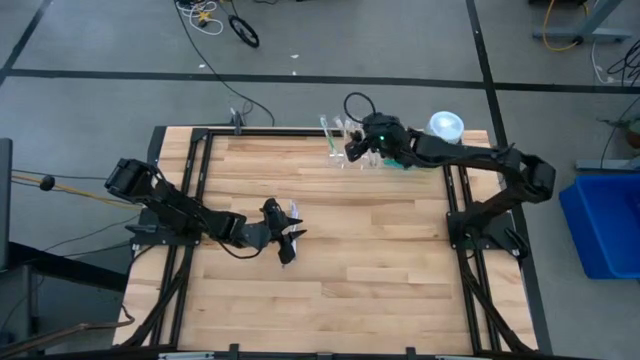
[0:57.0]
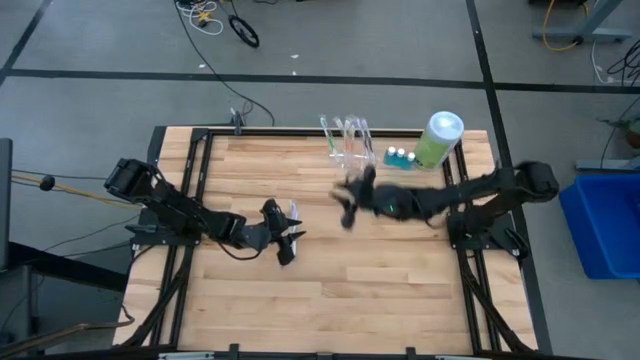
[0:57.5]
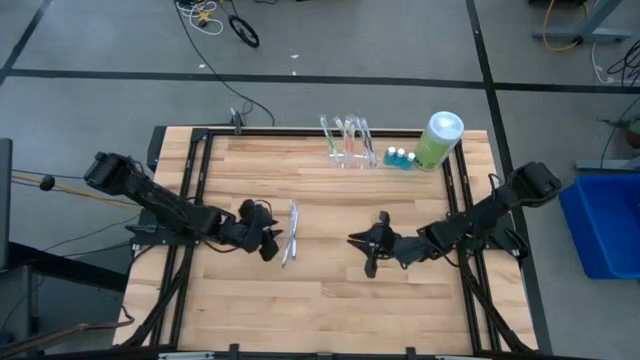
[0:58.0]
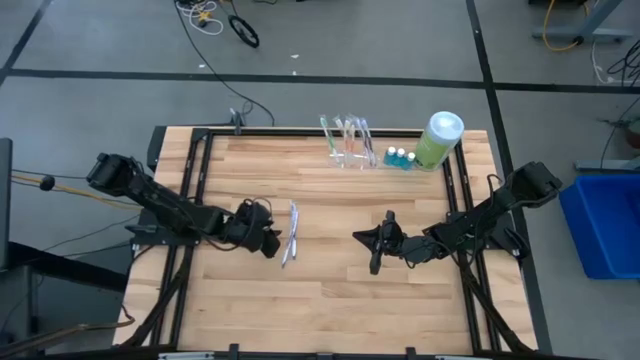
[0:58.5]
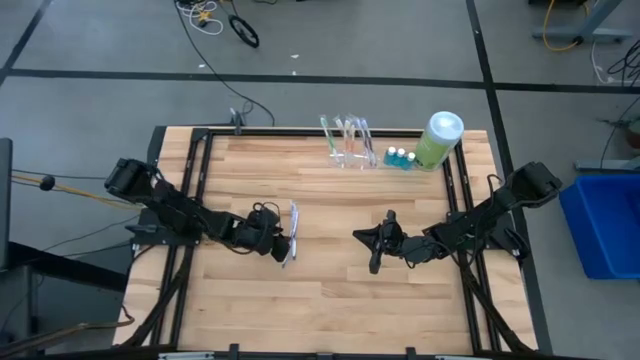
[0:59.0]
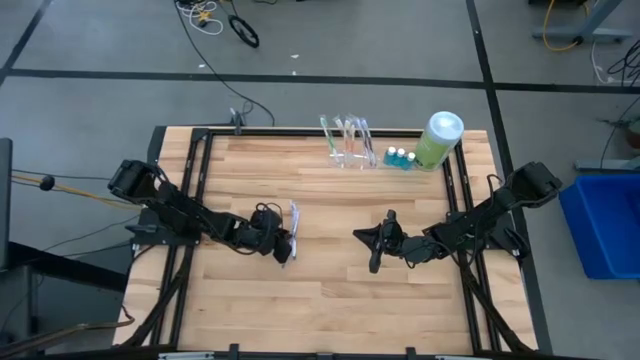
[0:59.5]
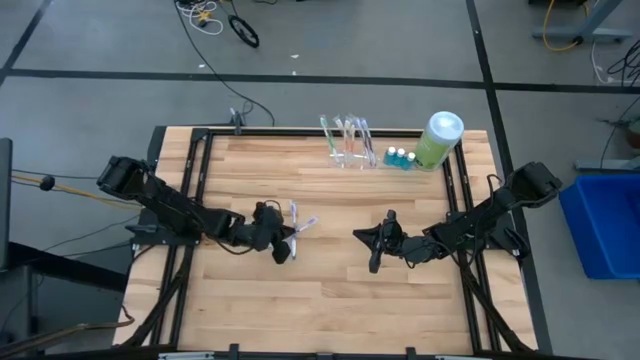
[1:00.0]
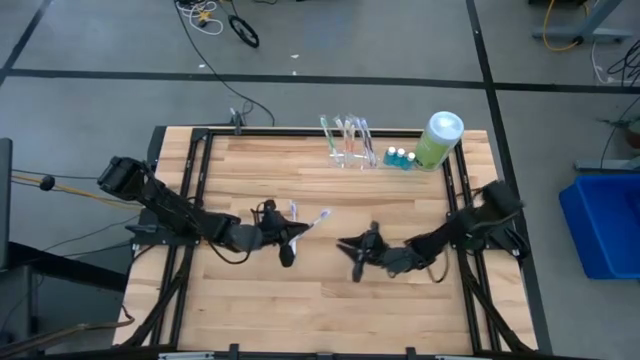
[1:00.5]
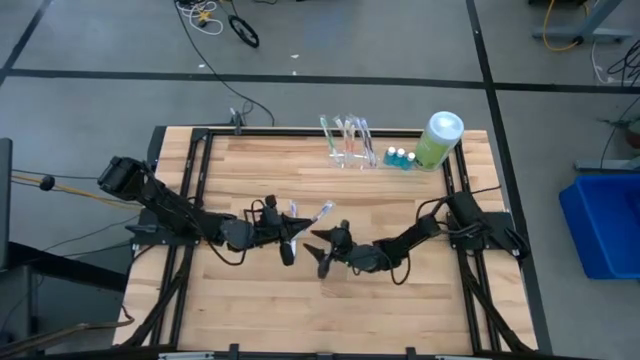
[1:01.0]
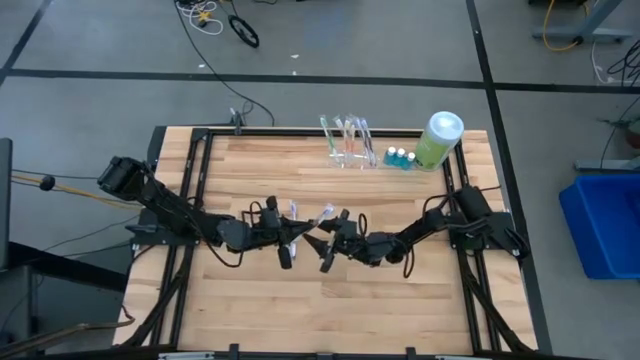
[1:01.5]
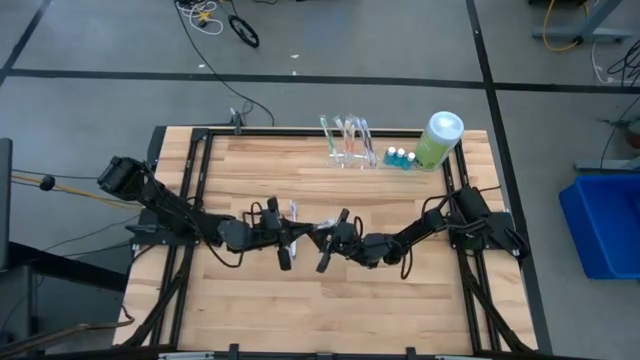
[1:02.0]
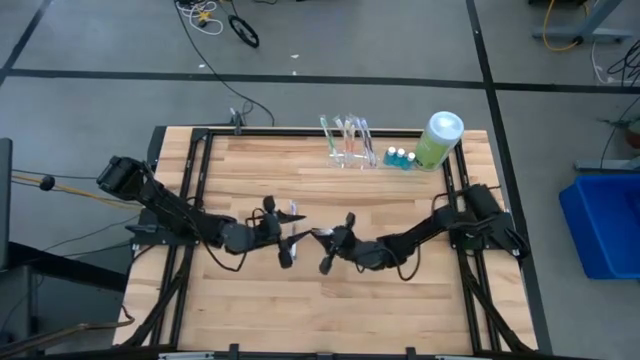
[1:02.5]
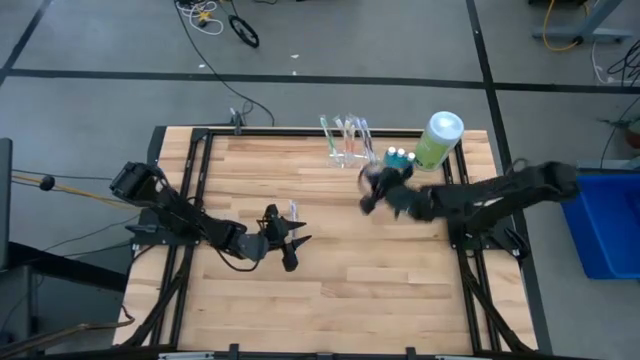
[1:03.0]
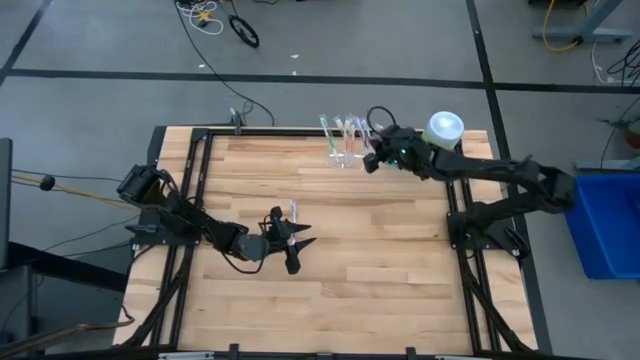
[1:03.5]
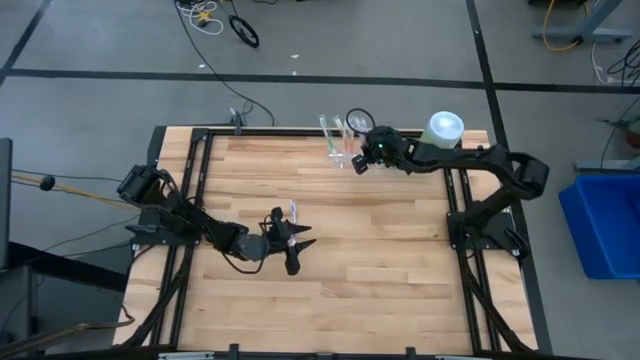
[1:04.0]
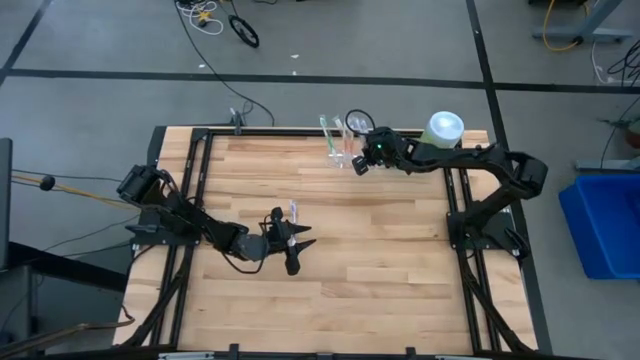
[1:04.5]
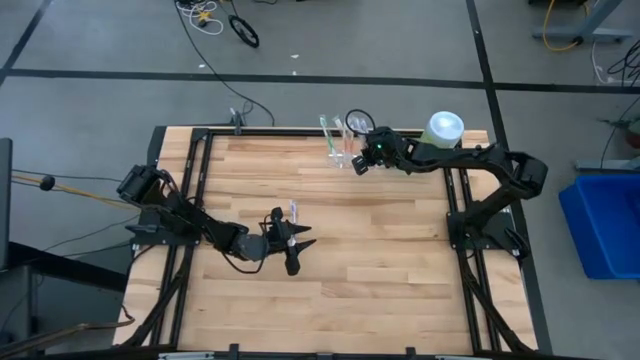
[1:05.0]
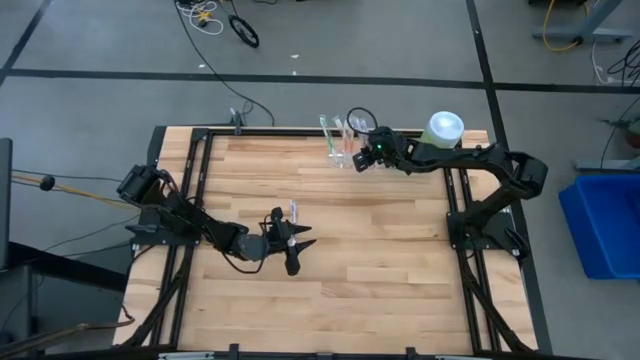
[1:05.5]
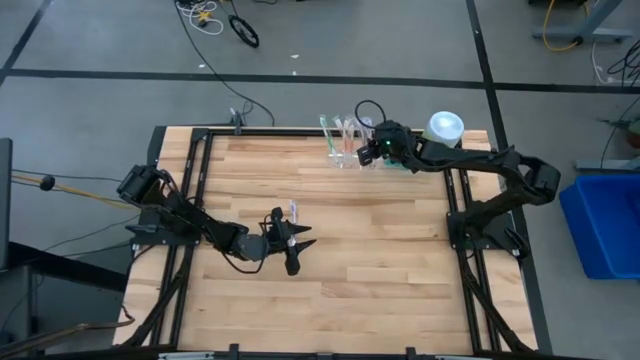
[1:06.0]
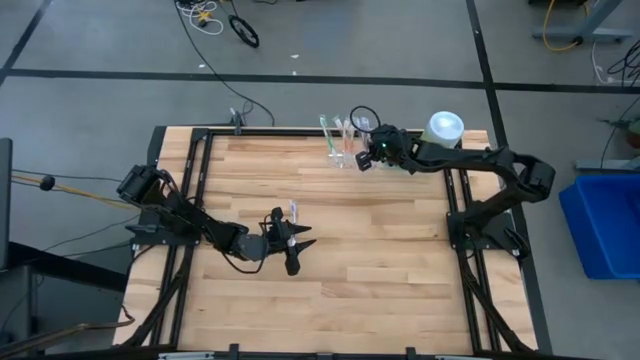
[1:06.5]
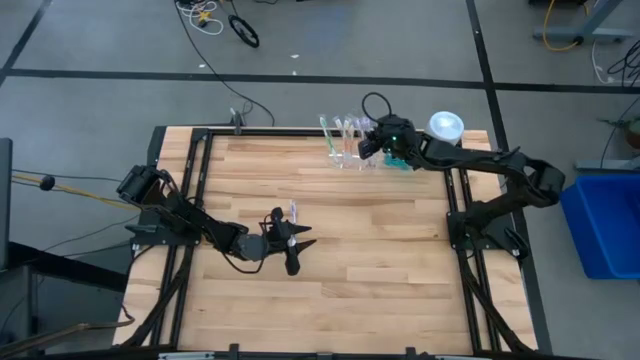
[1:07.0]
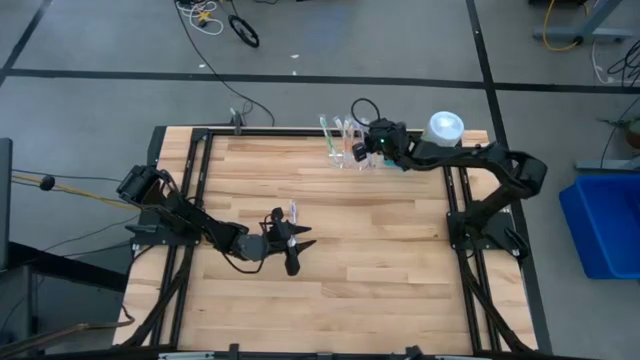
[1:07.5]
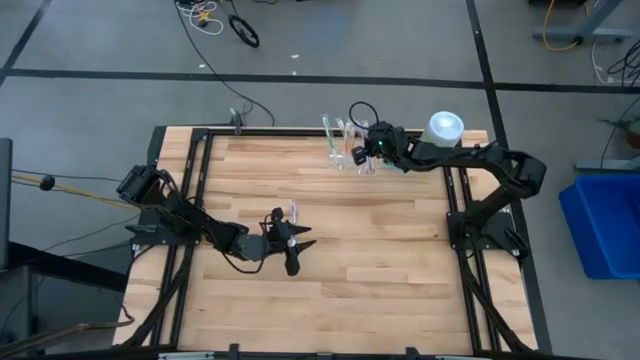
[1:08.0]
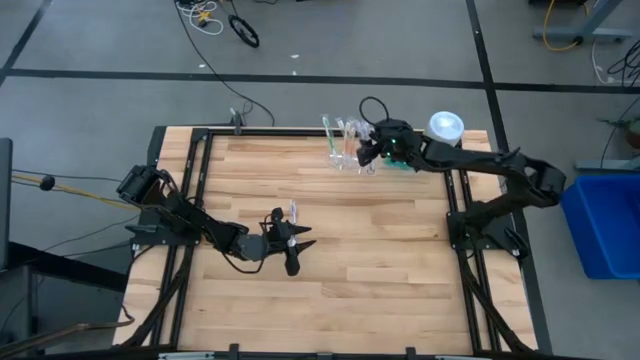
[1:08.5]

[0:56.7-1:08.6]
Task: Pick & Place toothbrushing station
Put the purple toothbrush into the right section of the transparent organizer

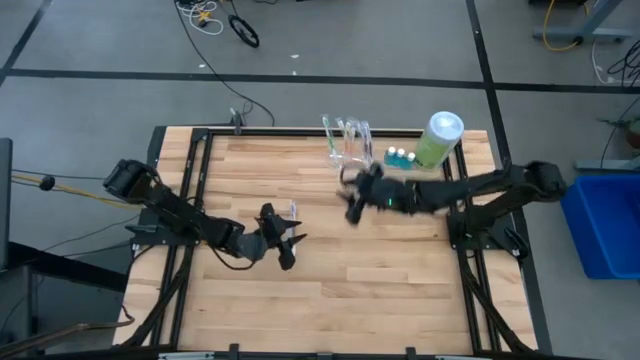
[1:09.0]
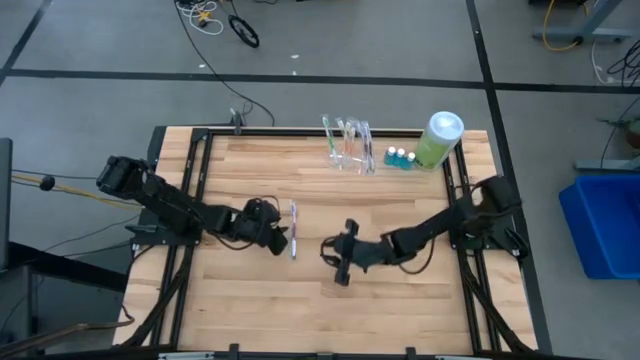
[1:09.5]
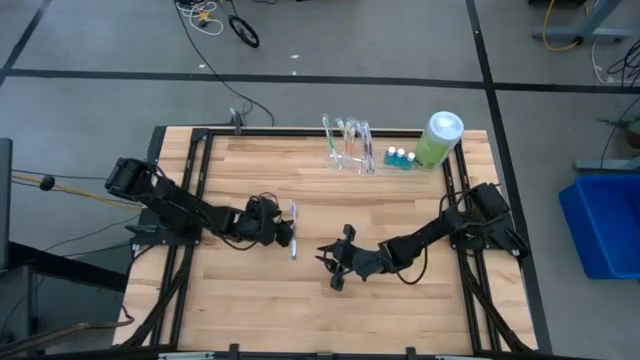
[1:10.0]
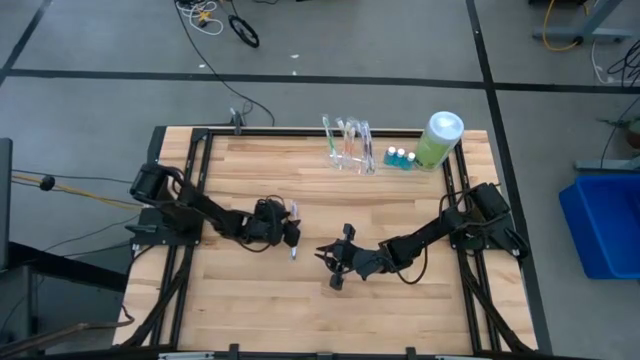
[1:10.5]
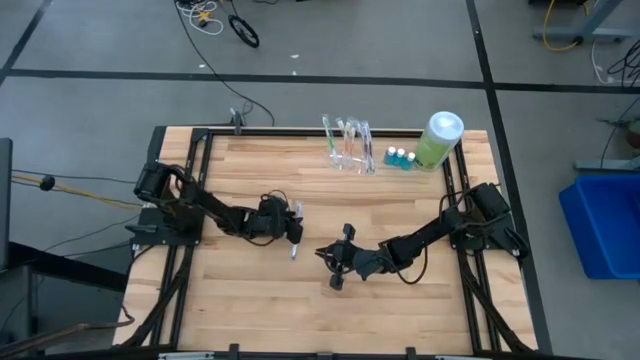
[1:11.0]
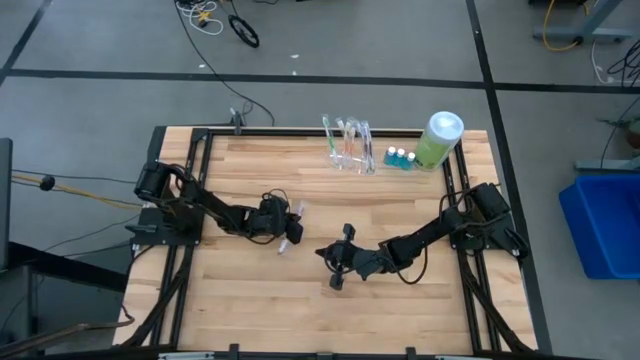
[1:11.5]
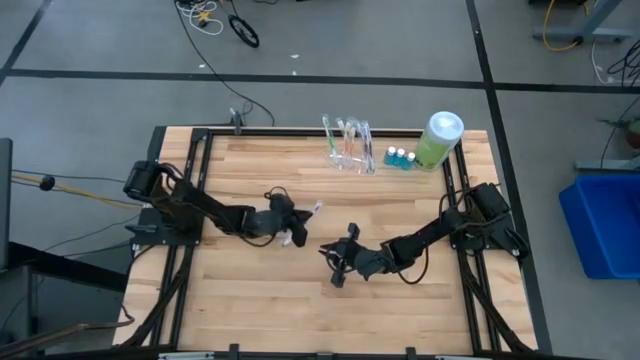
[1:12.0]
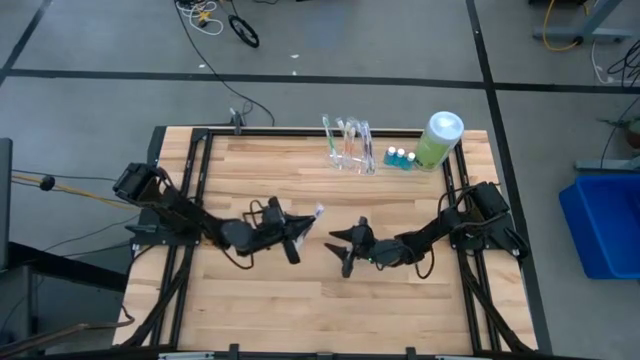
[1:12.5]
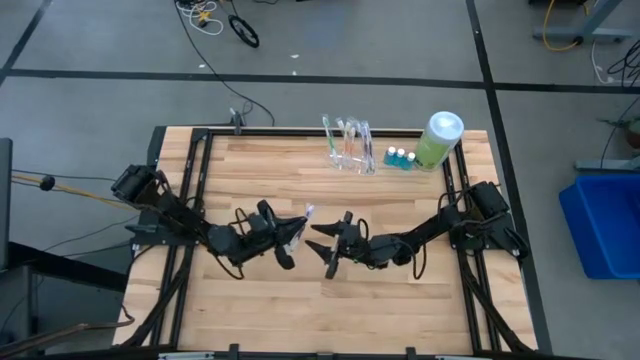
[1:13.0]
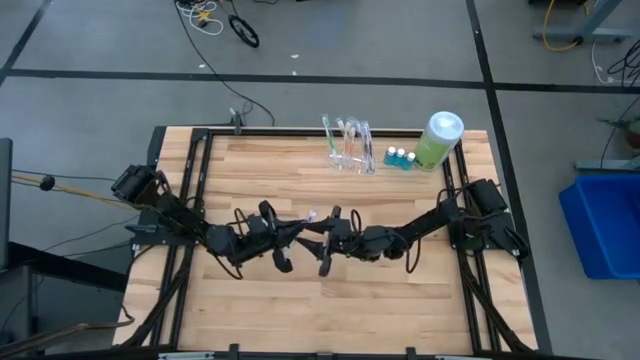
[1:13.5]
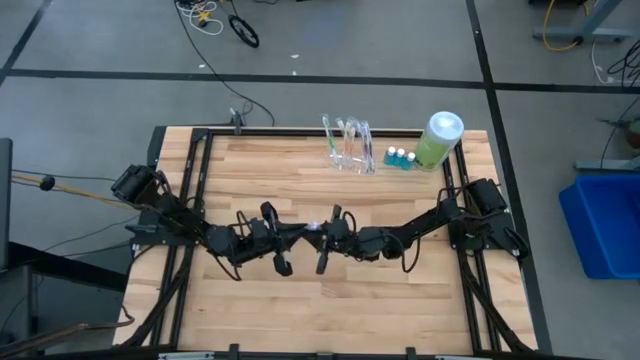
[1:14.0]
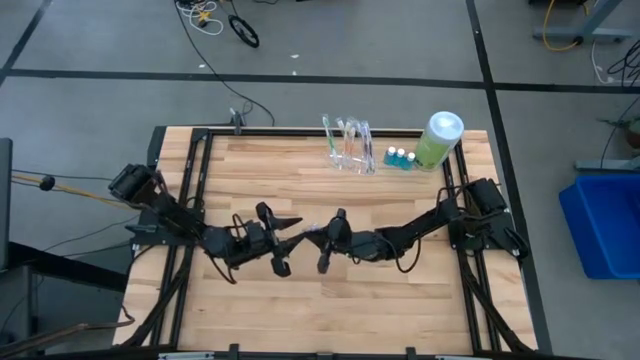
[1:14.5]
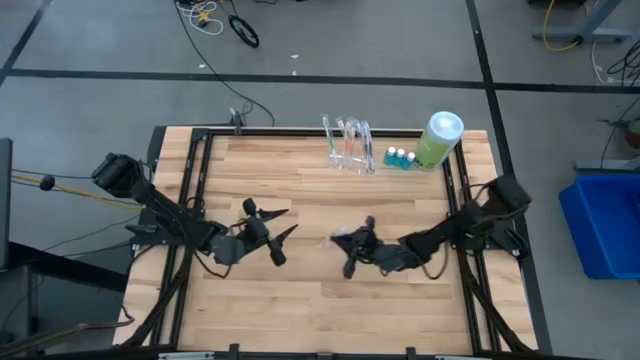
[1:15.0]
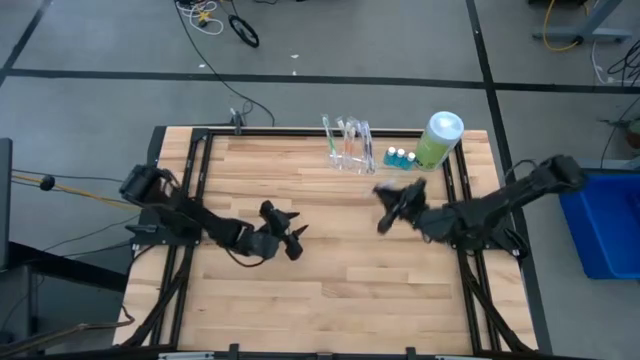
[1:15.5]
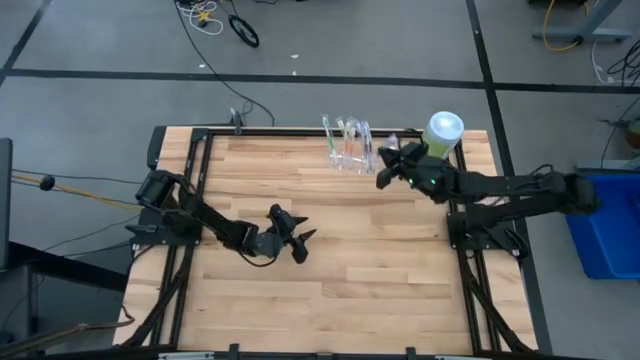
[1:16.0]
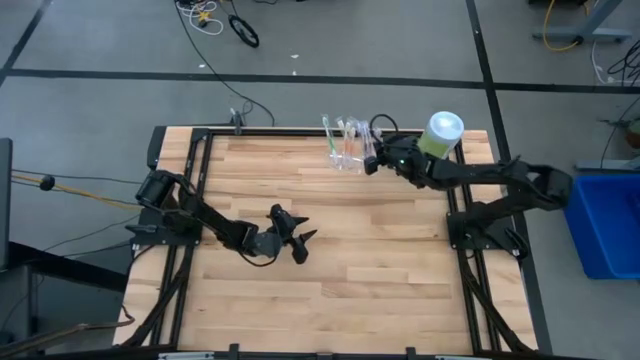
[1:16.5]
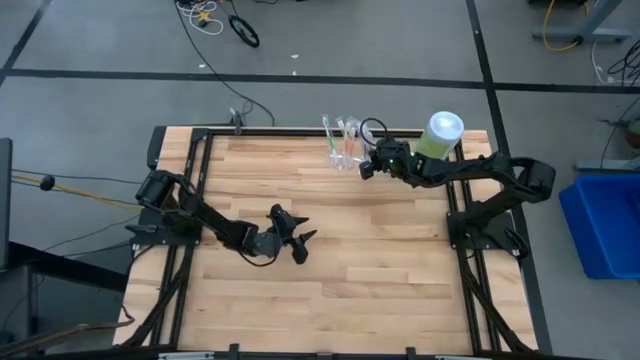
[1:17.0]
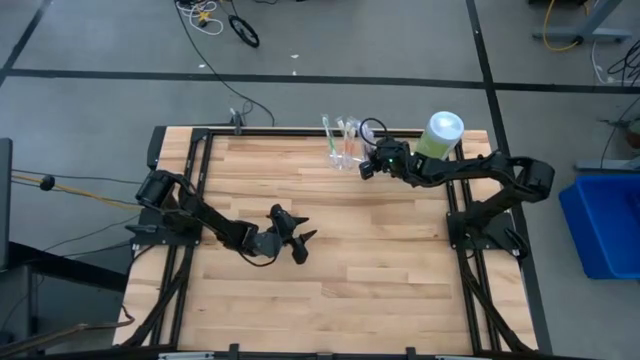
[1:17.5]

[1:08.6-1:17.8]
Put the purple toothbrush into the right section of the transparent organizer

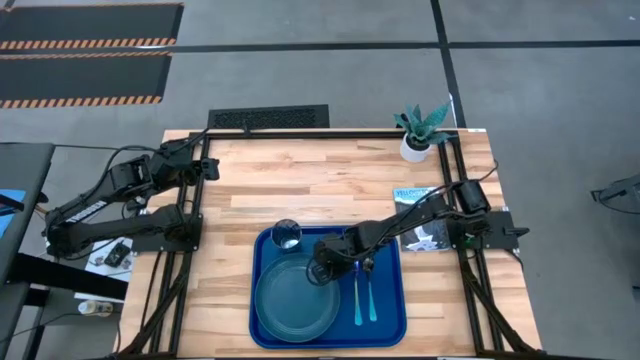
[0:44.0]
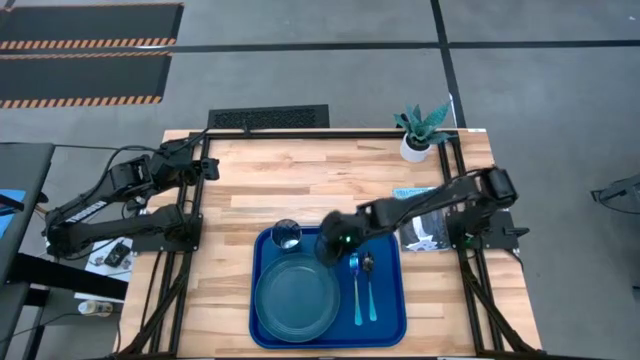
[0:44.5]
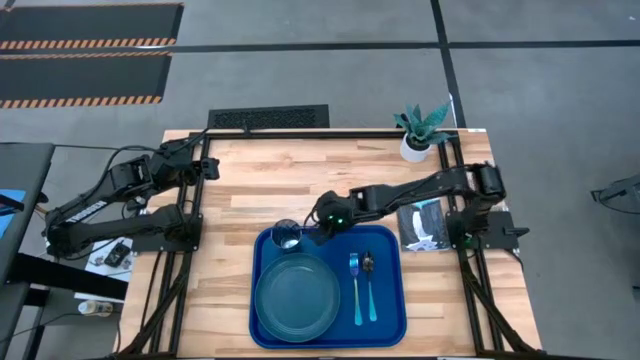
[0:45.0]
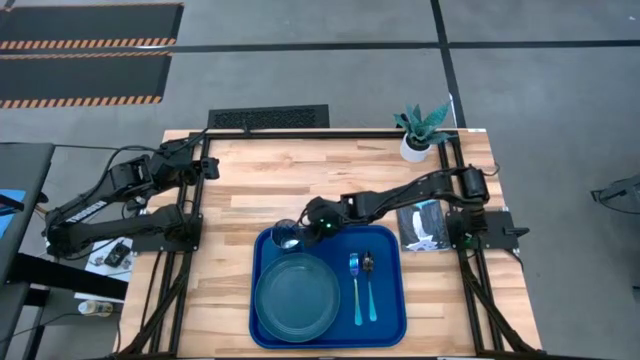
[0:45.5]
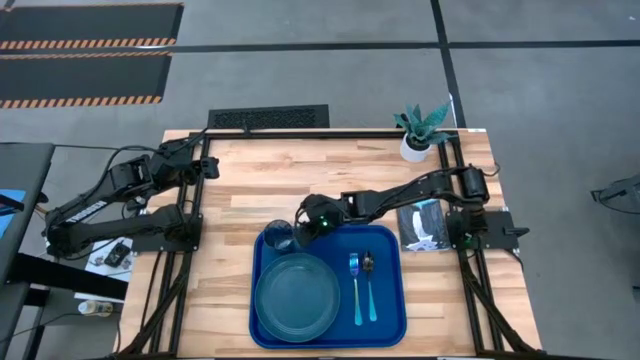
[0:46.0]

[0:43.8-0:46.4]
Task: Pick and place plate/cup/fork/spoon on tray
Adjust the blue cup
